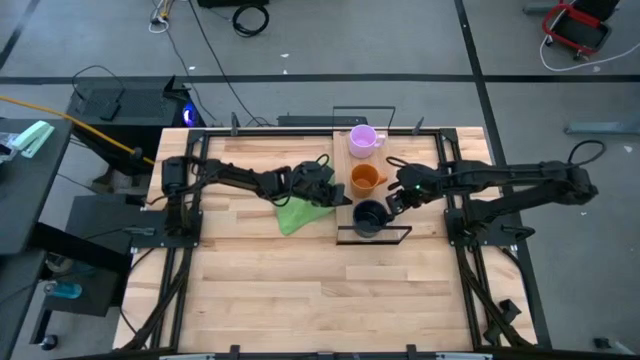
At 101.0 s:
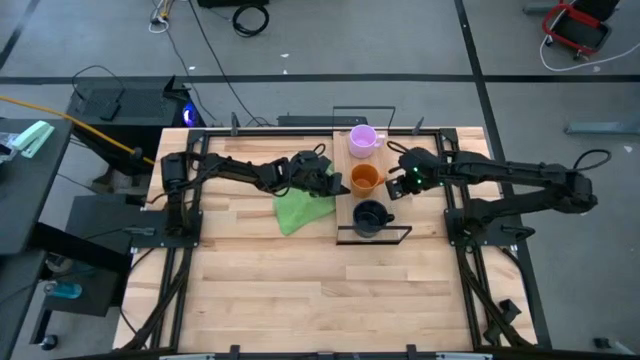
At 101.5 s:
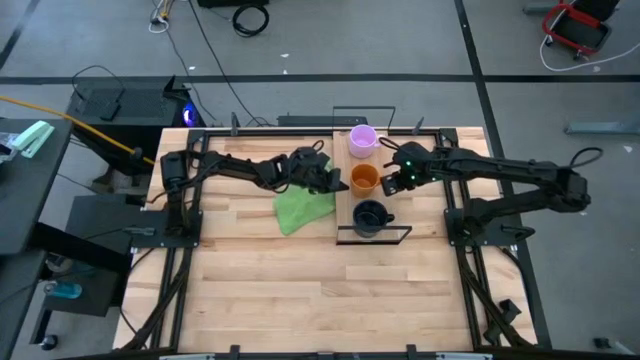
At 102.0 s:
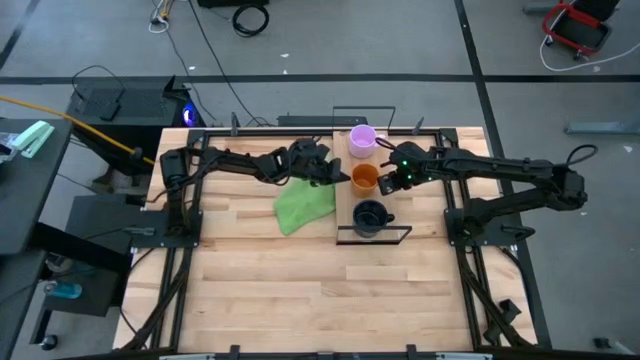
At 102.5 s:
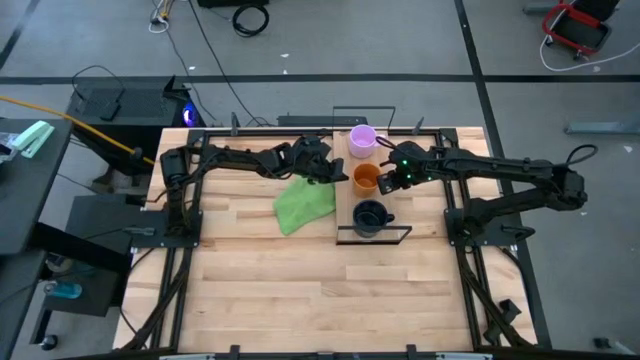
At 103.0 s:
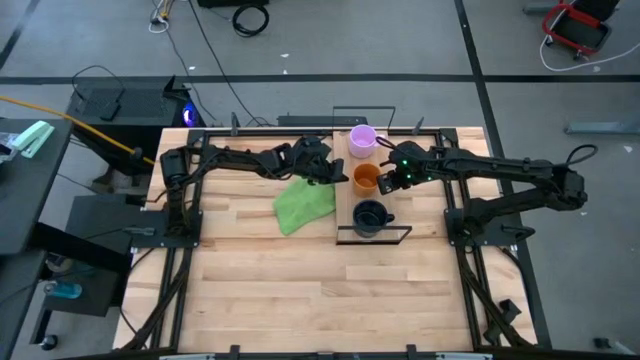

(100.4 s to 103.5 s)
Task: Stack small to large cups/mugs on shelf
Adjust the orange mug

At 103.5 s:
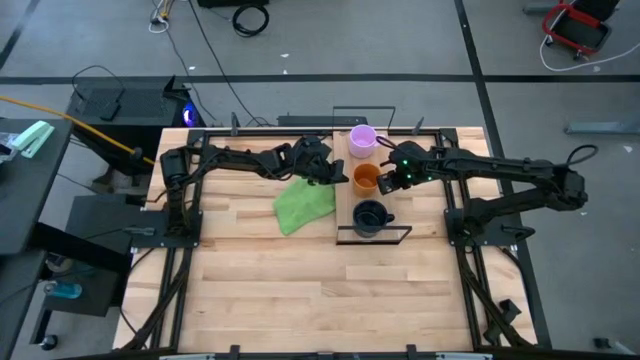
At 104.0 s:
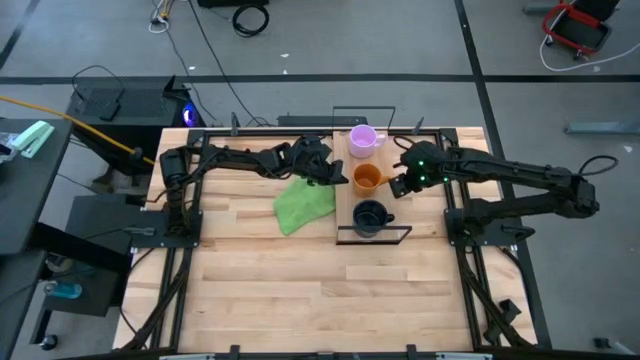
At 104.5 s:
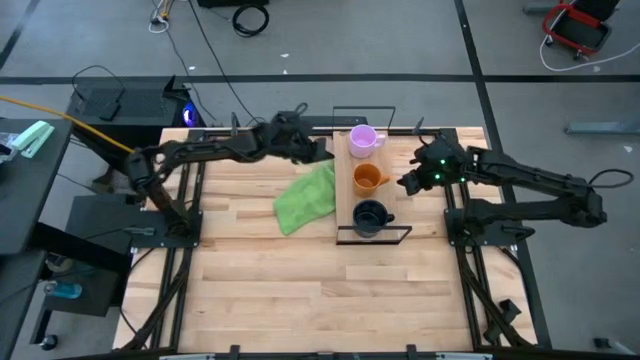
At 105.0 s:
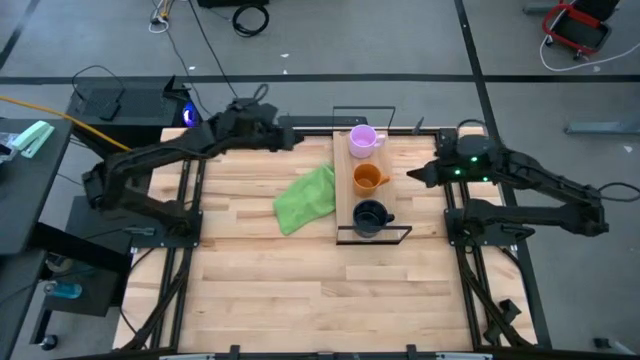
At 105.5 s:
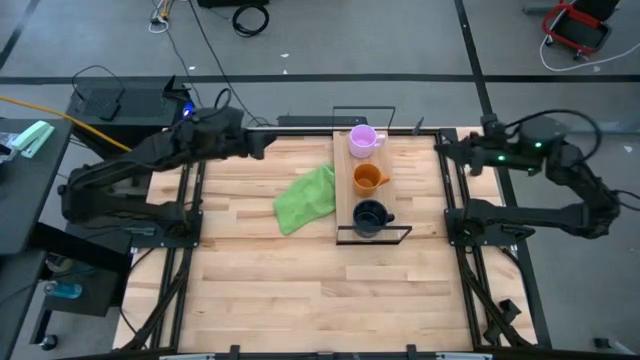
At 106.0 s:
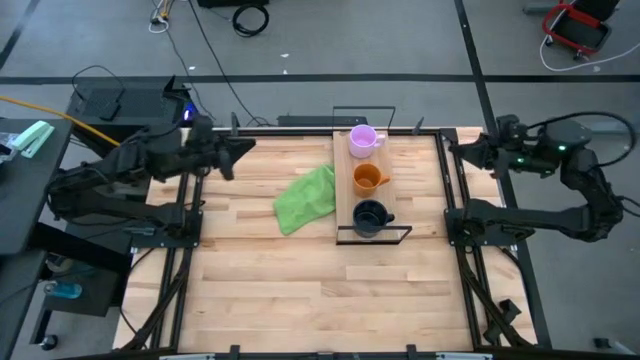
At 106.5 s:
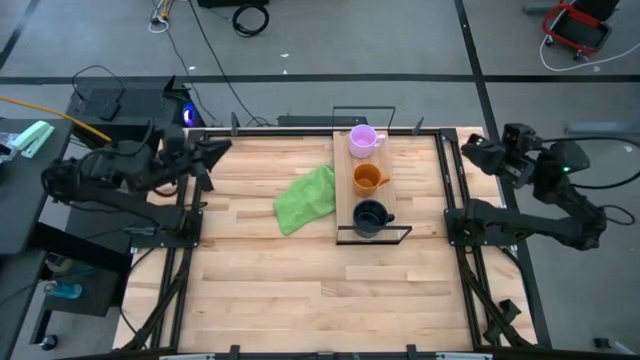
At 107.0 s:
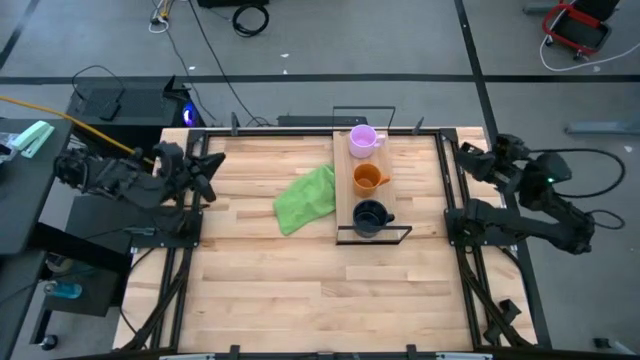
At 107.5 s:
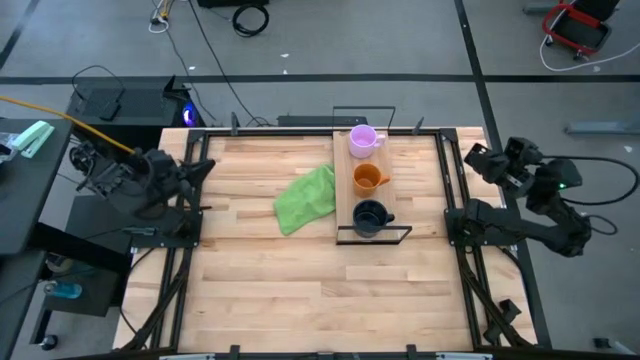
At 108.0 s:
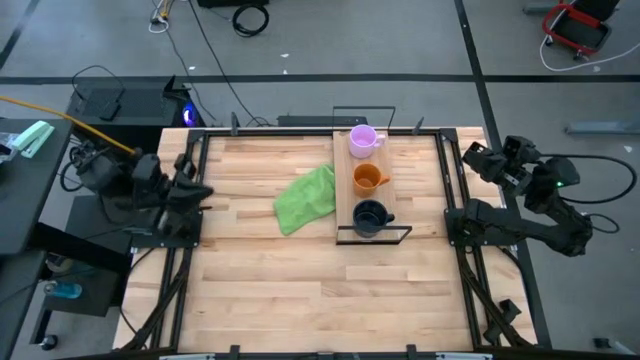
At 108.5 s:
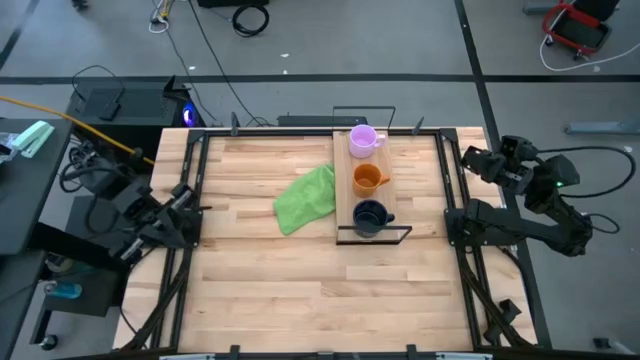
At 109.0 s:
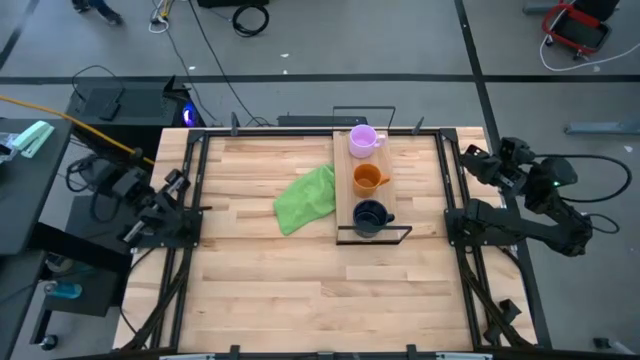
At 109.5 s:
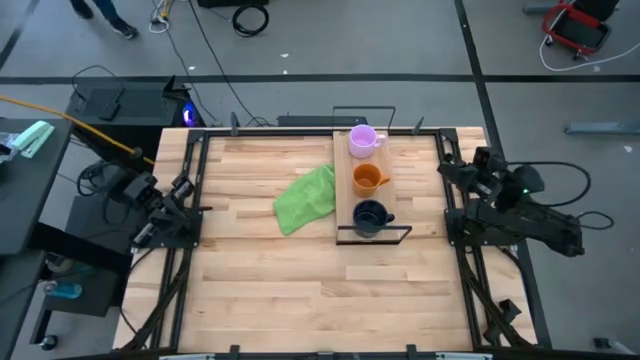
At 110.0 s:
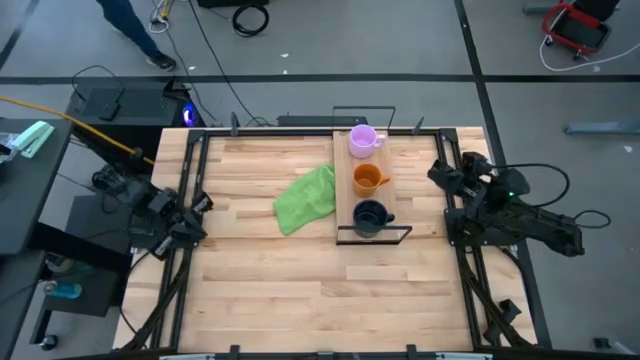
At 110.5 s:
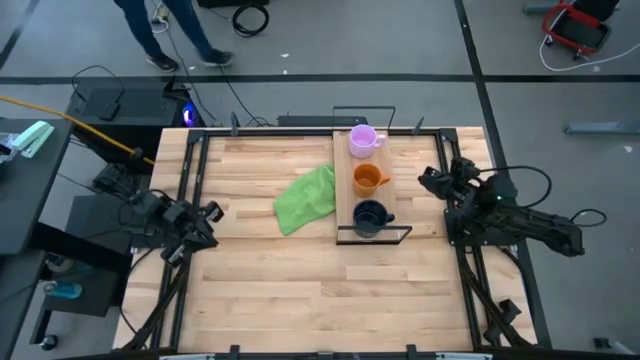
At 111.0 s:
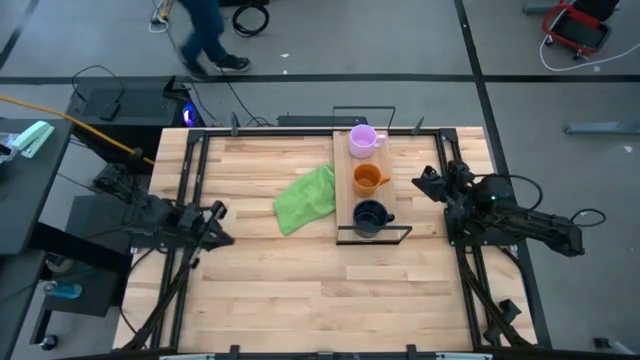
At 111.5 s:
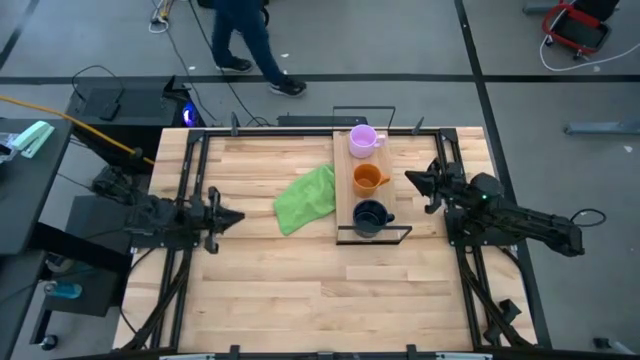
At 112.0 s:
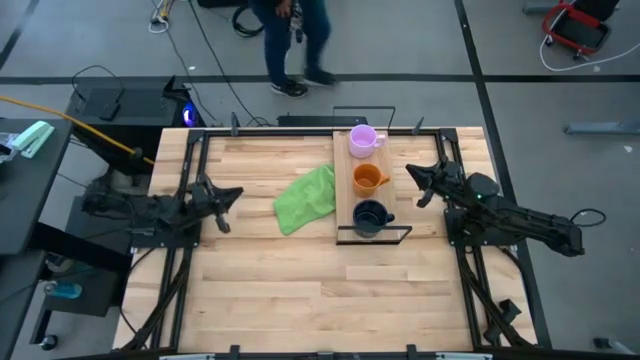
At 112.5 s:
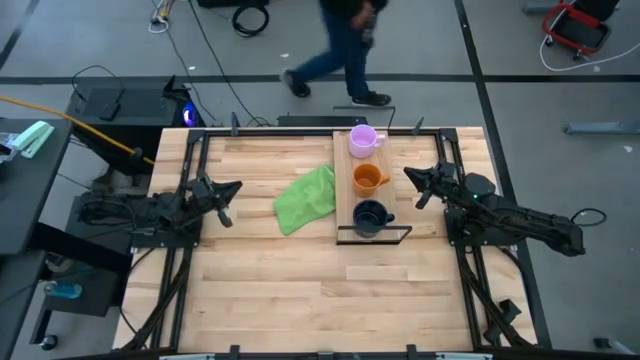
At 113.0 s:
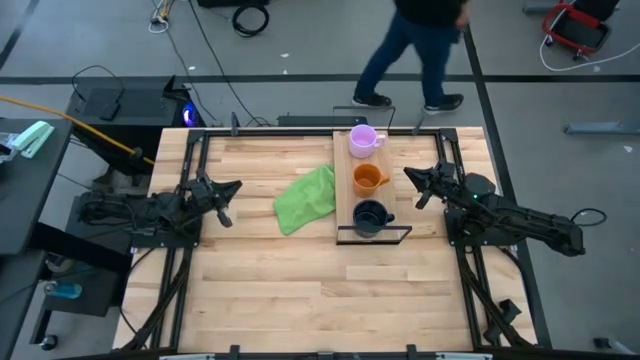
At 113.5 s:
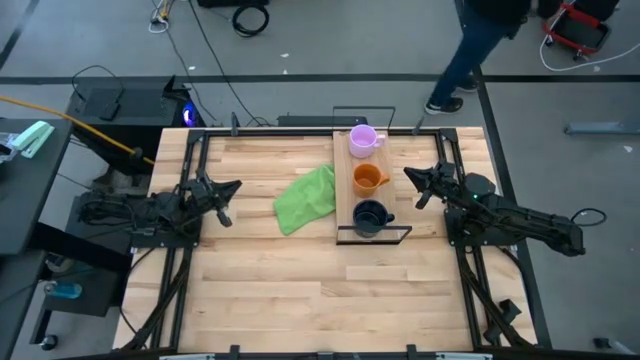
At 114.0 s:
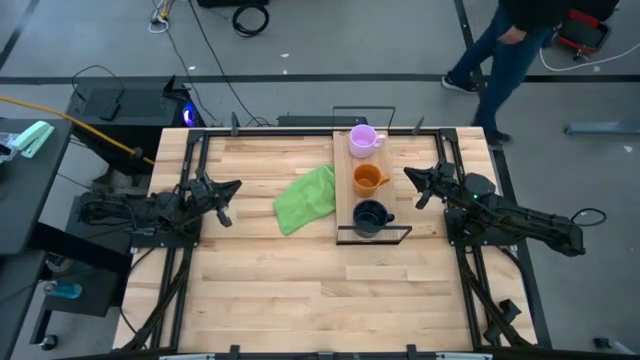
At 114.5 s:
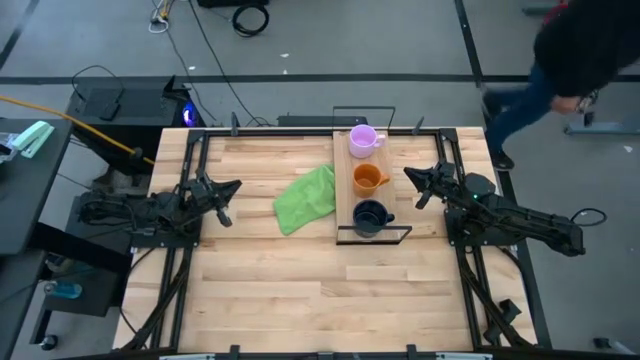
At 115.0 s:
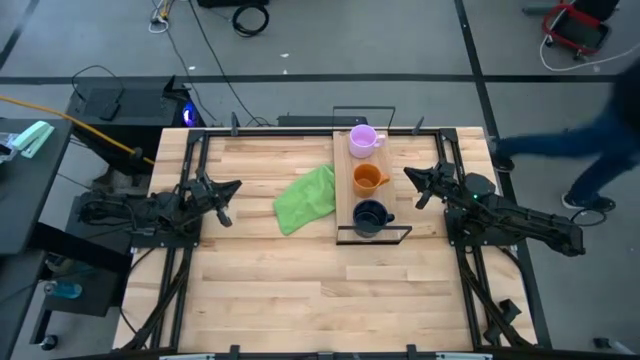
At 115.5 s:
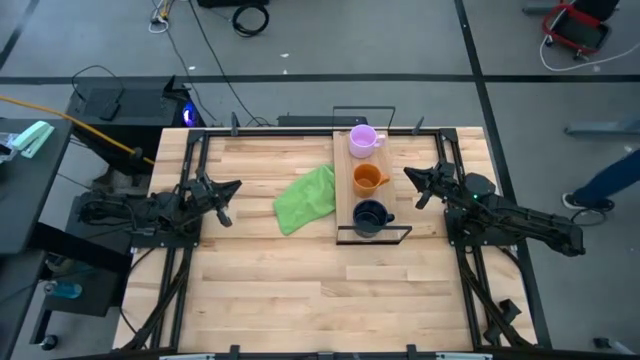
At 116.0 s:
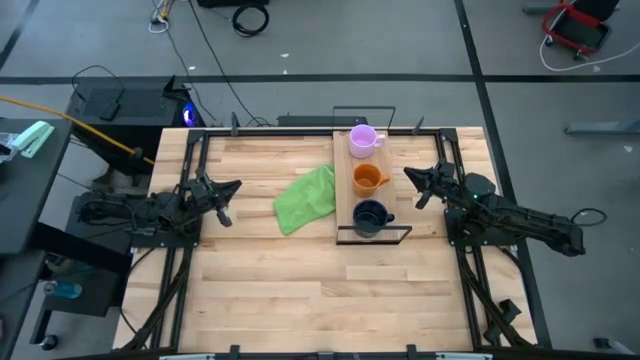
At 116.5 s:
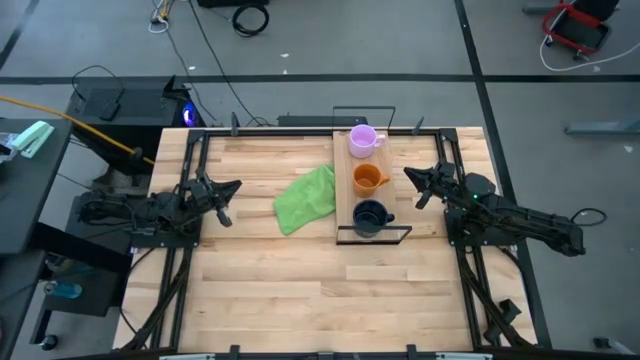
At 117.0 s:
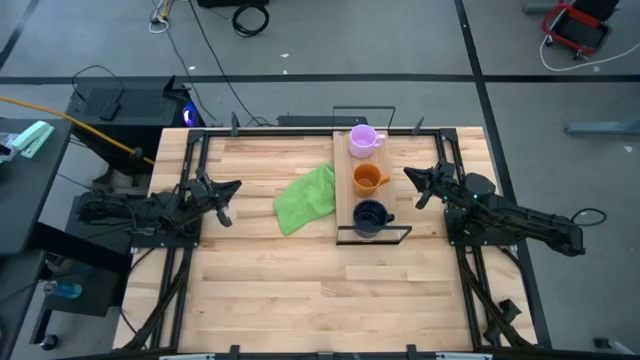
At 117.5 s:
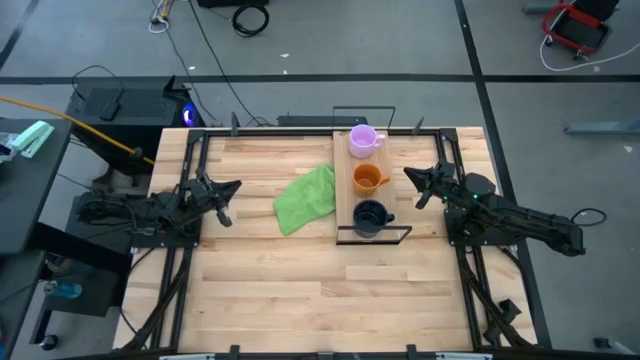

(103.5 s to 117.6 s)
Return to Home Position

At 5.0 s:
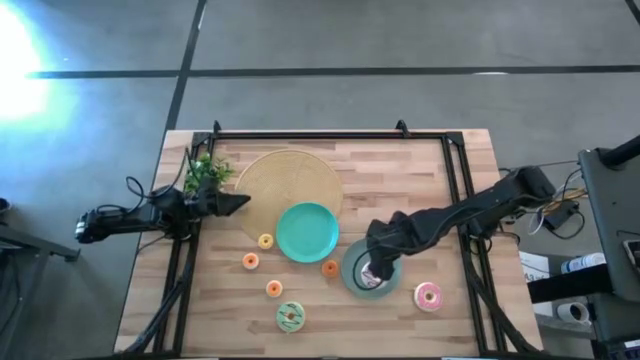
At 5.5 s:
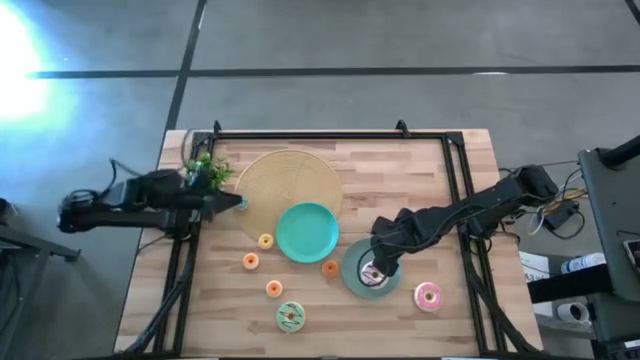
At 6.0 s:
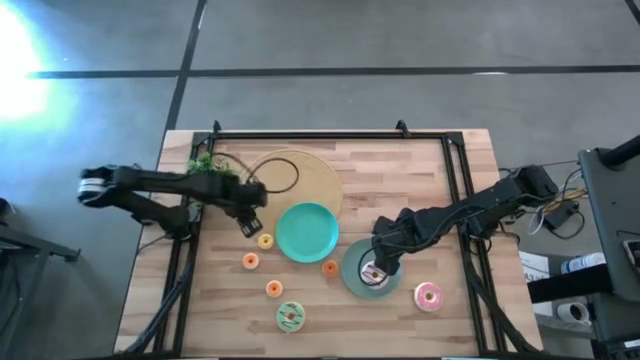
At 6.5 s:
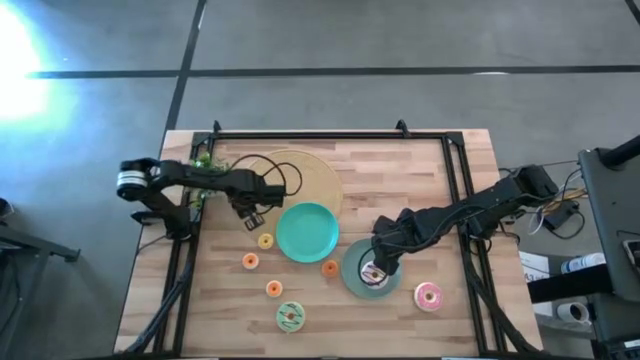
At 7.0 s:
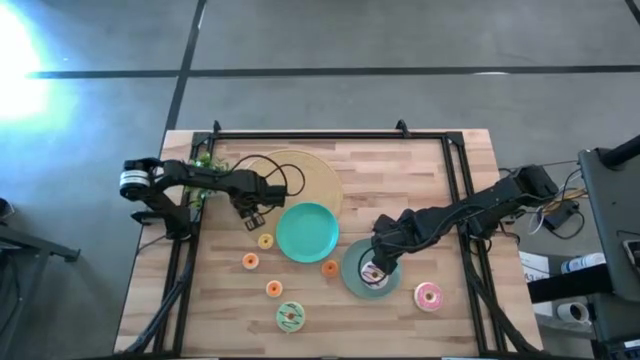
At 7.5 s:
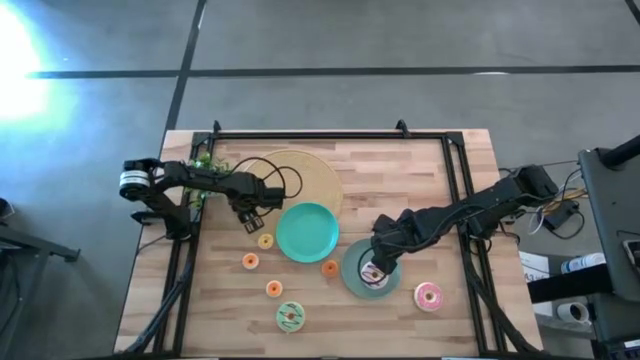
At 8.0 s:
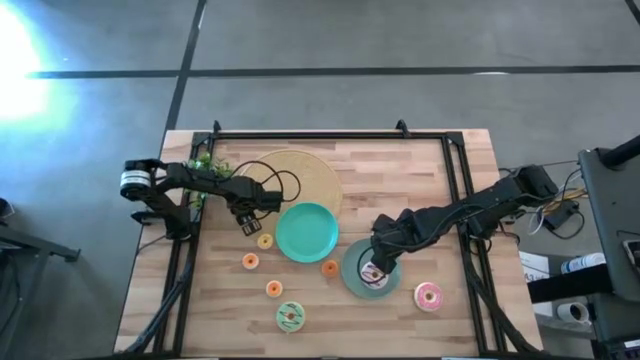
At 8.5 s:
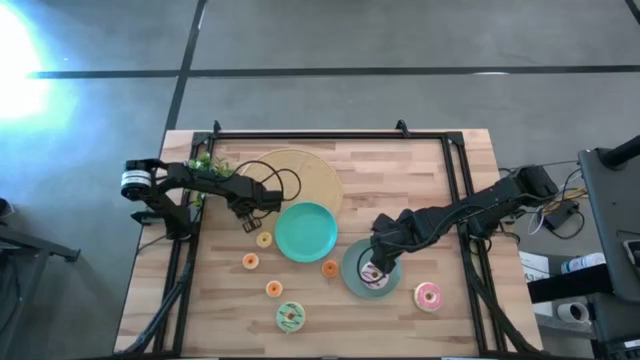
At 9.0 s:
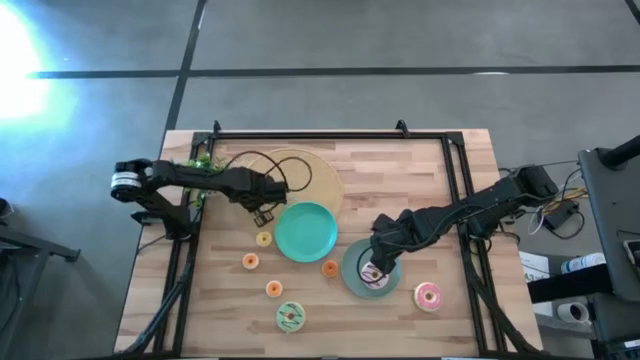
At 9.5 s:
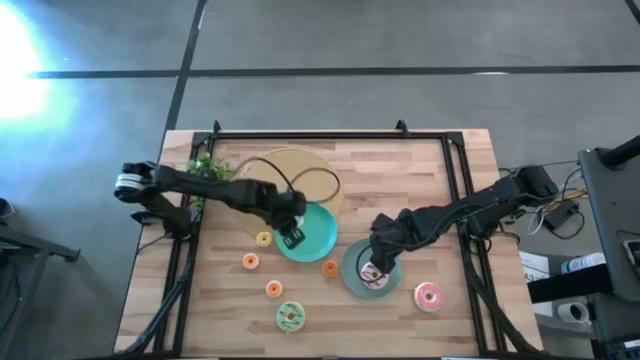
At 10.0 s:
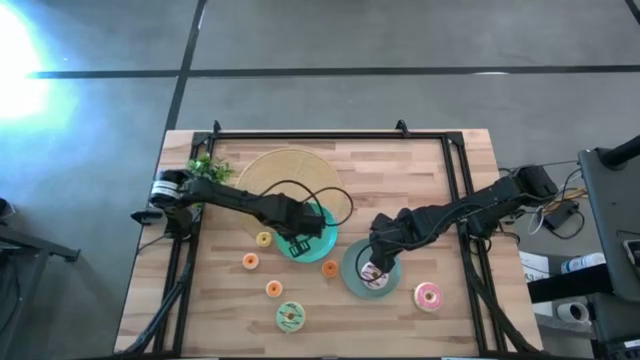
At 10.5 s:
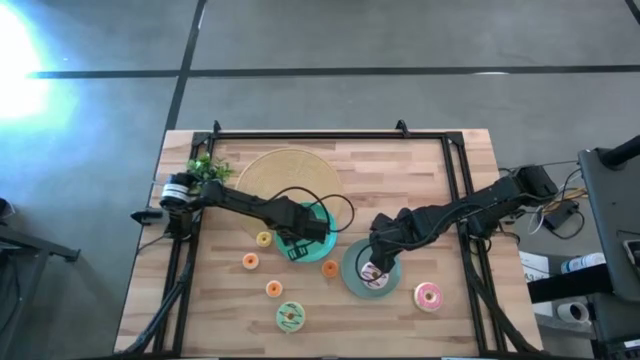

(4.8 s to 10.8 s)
Task: Pick & Place donuts
Put the small blue doughnut on the blue plate
